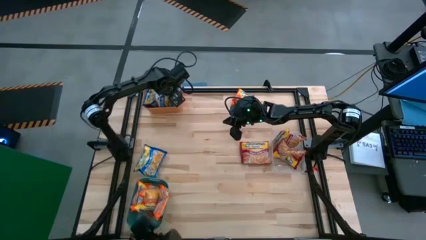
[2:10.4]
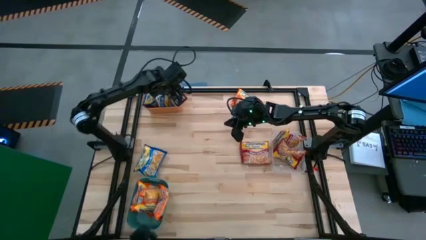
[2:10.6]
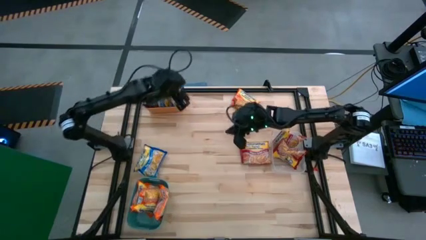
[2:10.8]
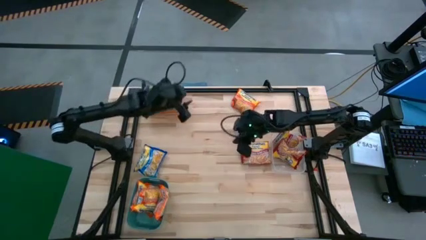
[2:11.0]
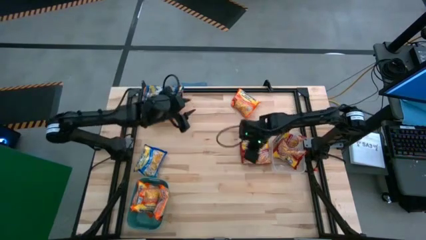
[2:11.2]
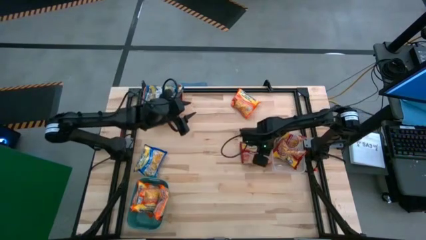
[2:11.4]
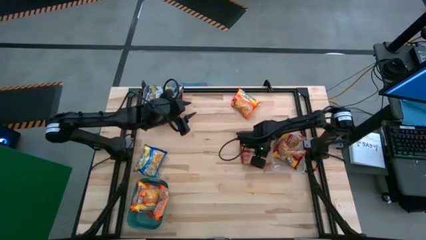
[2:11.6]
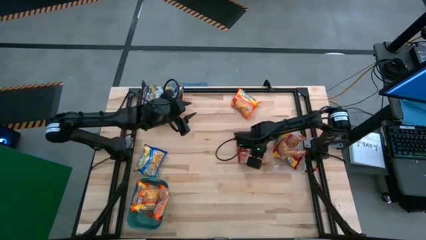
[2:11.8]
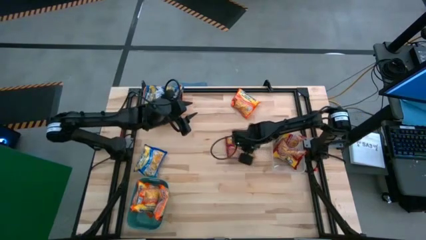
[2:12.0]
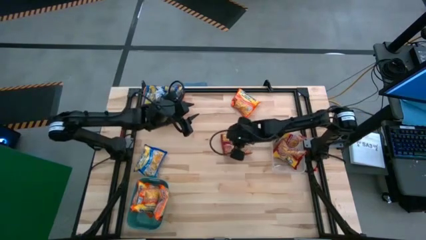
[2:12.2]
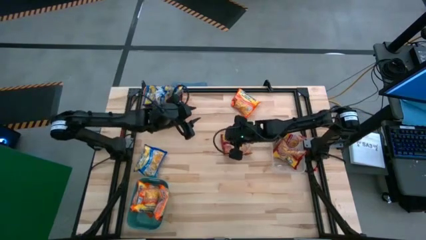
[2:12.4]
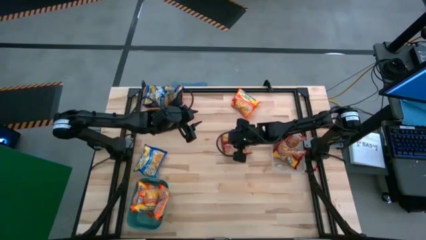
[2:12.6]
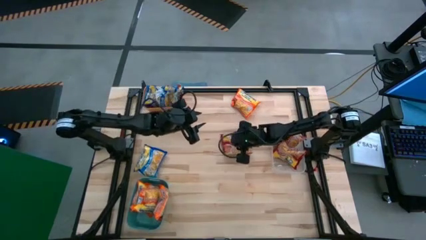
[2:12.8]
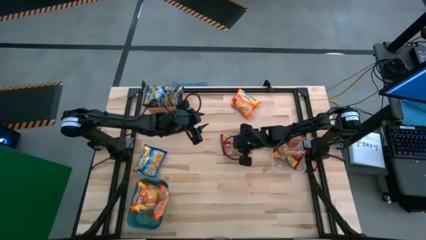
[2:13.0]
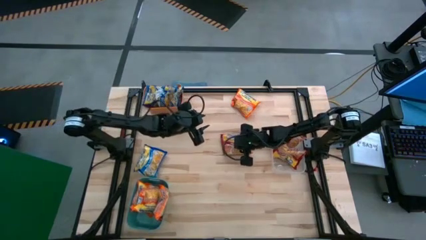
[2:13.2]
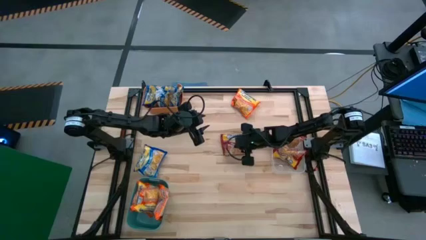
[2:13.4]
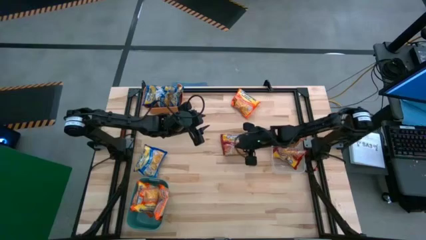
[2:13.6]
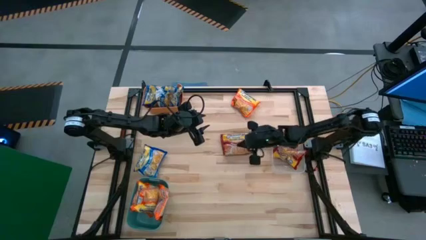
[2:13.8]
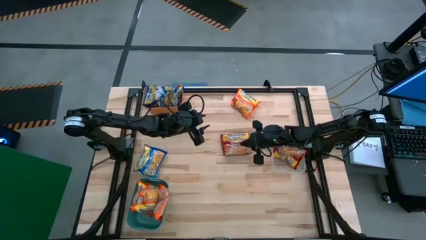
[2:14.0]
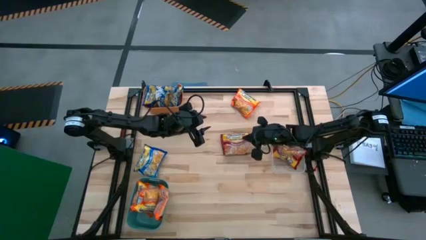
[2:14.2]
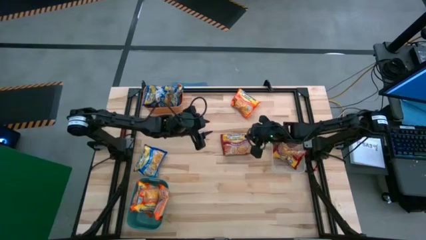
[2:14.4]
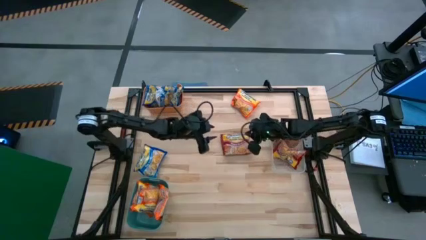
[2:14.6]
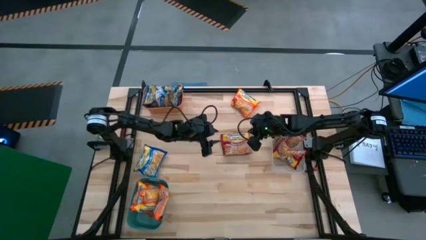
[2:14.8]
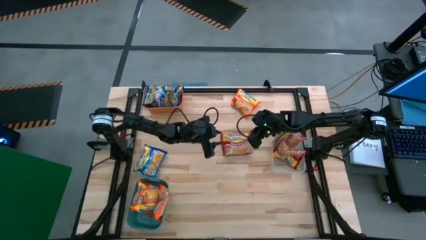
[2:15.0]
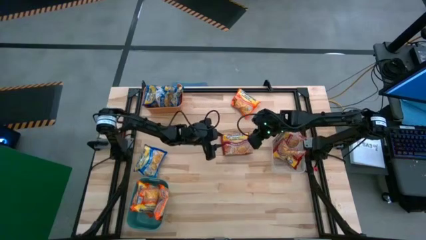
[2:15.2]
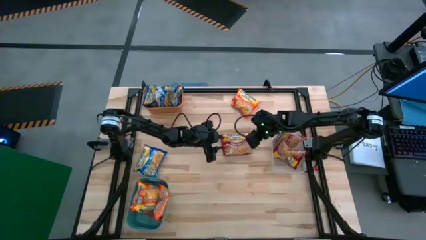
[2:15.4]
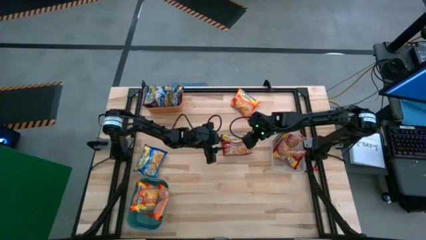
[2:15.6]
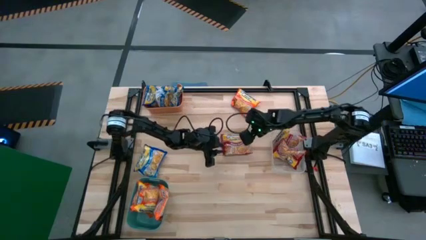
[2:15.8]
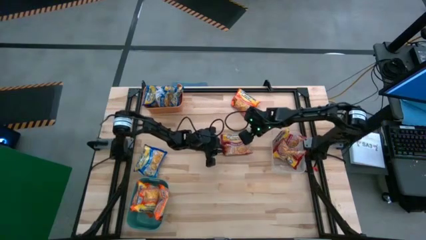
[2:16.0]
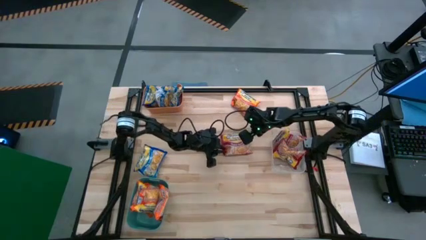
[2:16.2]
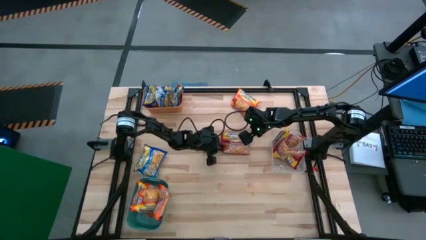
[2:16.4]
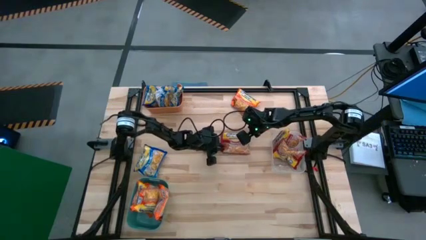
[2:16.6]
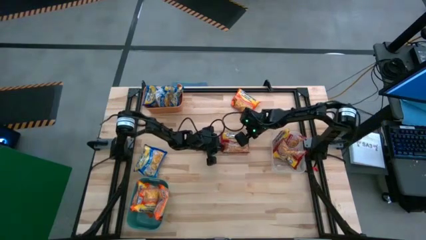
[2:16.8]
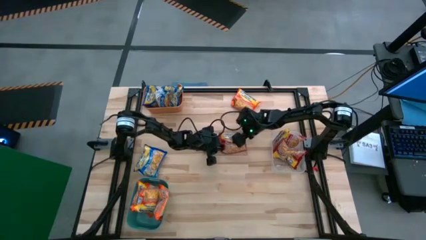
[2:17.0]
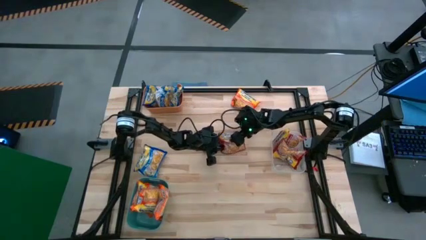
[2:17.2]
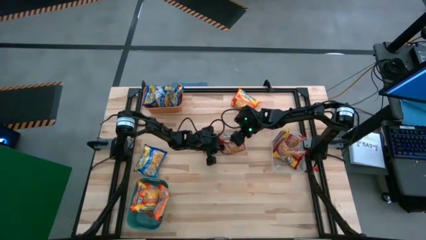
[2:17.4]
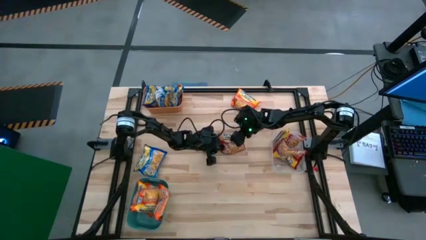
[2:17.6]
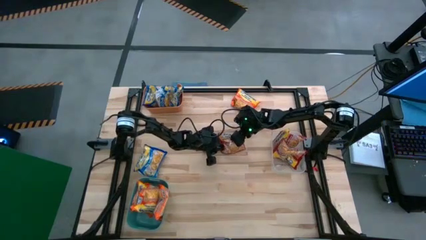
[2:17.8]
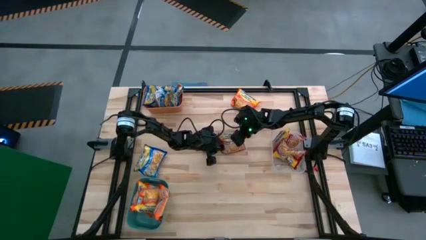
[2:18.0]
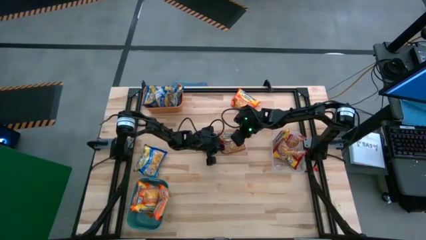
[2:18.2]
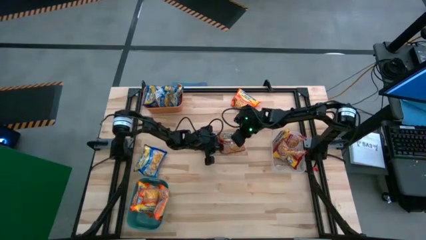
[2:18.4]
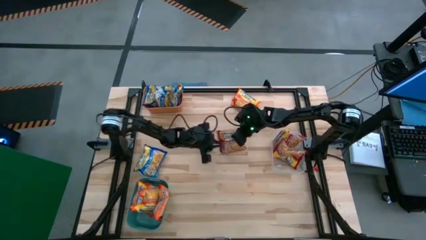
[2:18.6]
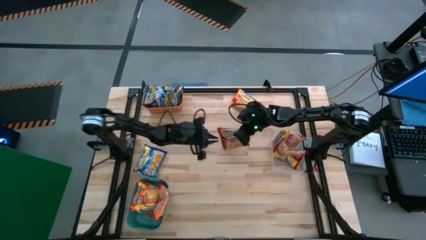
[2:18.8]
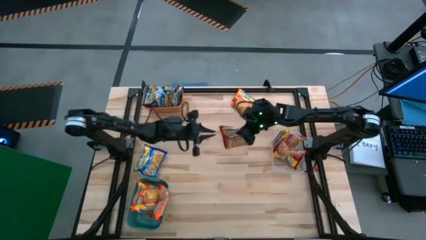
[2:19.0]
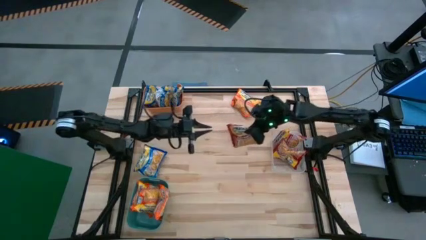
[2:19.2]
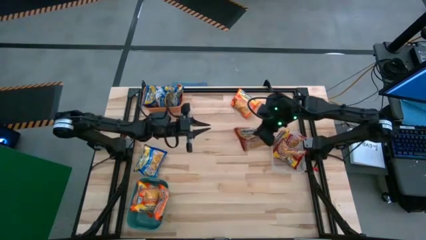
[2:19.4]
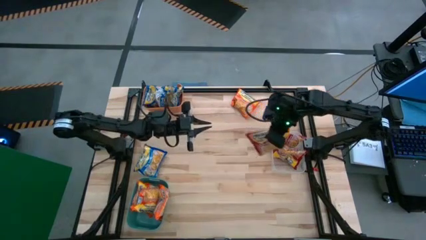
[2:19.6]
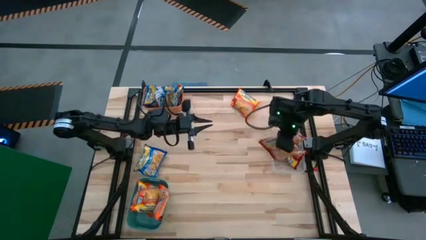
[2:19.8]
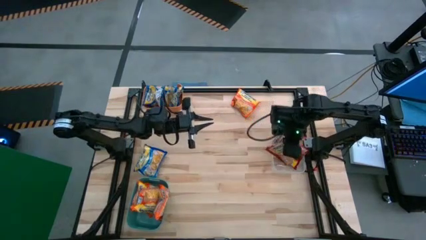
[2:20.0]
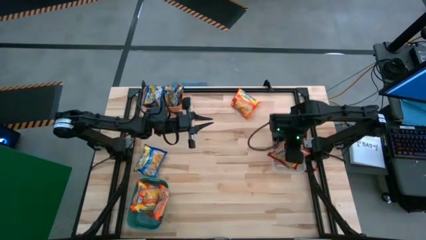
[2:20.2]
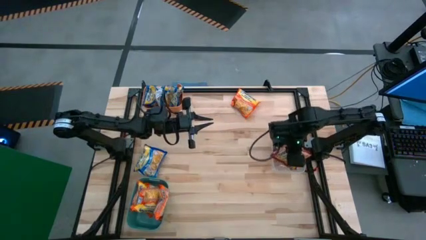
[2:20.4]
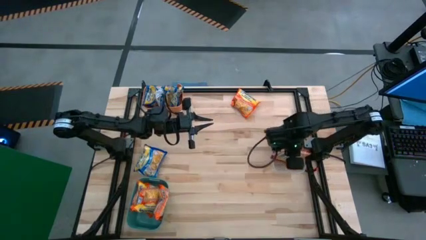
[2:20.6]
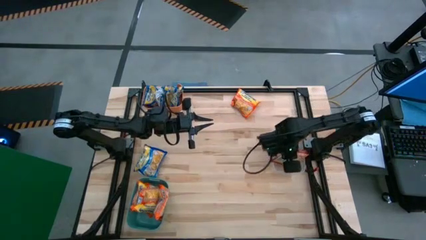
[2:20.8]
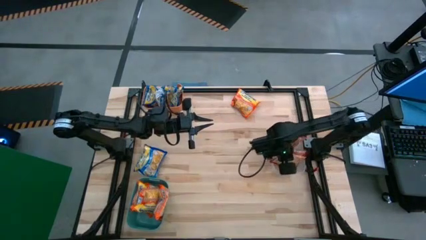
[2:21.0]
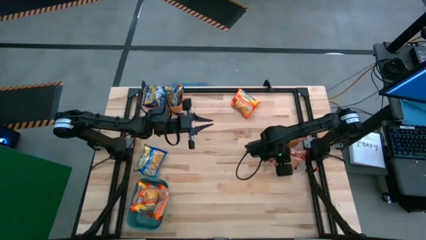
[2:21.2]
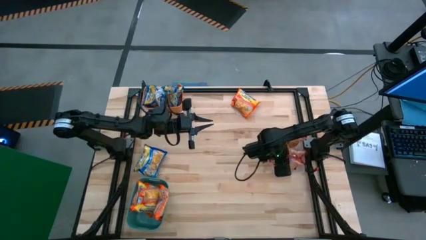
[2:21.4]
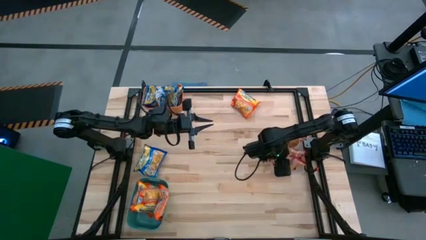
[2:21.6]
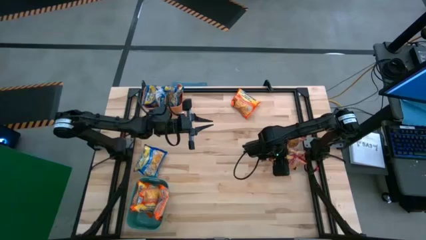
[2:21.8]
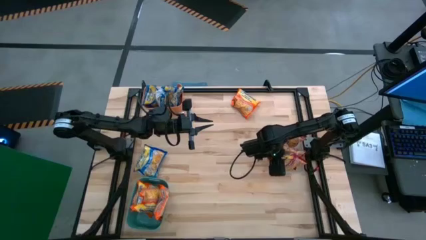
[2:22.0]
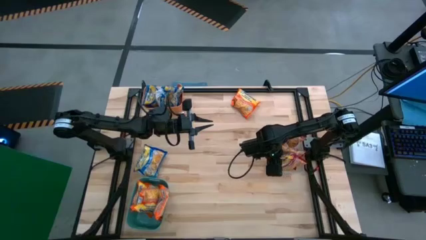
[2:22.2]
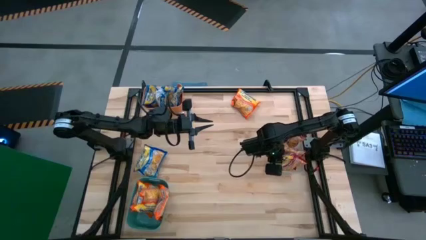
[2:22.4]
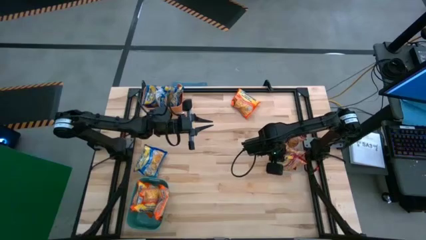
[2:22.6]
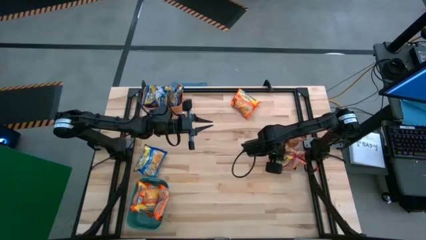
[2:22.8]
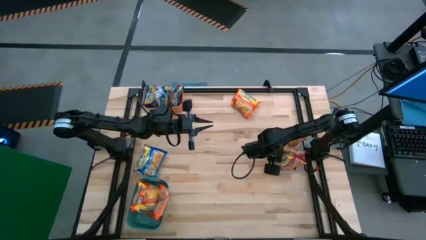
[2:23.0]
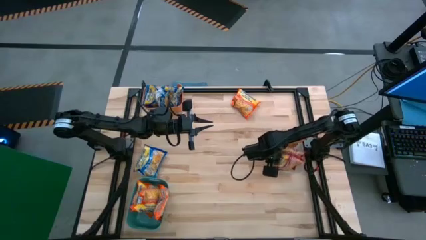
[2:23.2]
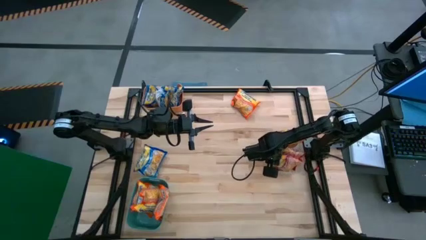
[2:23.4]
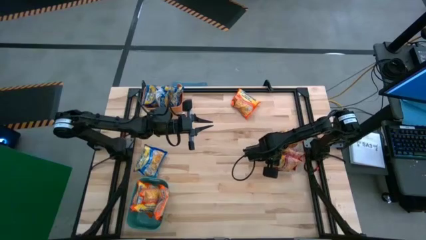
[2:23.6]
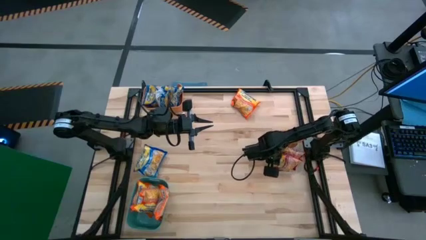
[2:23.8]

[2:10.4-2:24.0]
Task: Sort Maruchan noodles
Put the red noodle pack into the transparent bin

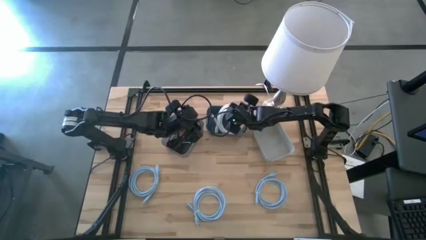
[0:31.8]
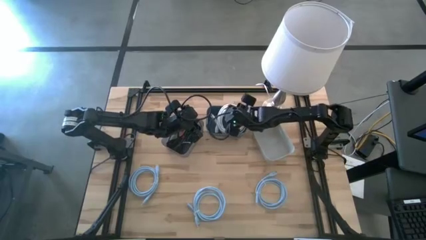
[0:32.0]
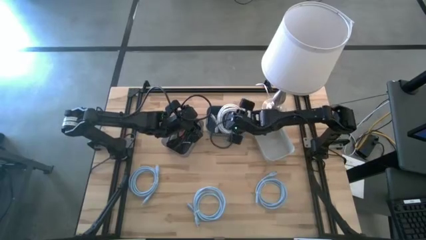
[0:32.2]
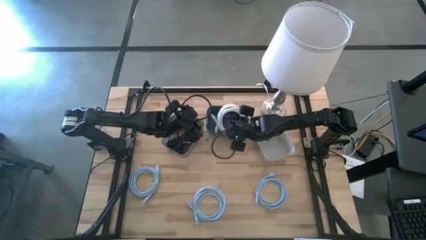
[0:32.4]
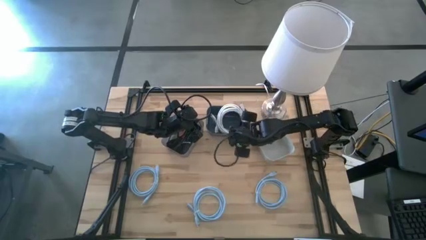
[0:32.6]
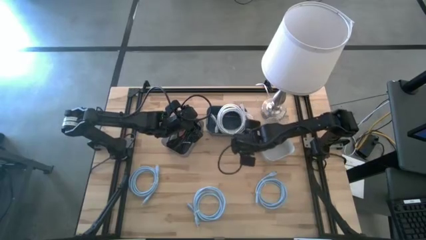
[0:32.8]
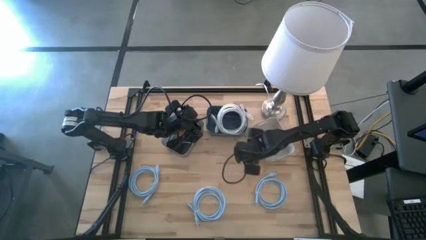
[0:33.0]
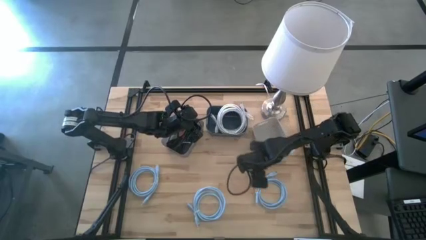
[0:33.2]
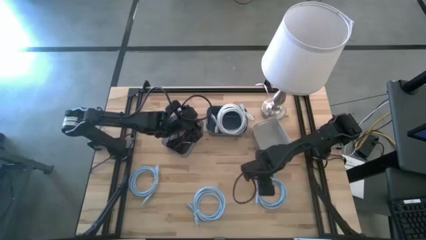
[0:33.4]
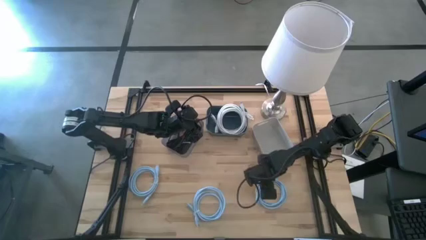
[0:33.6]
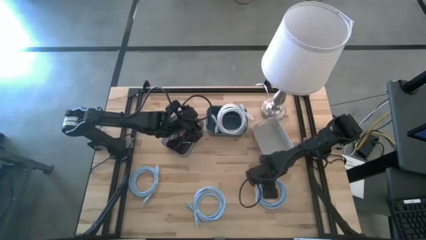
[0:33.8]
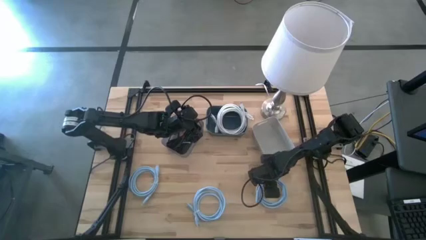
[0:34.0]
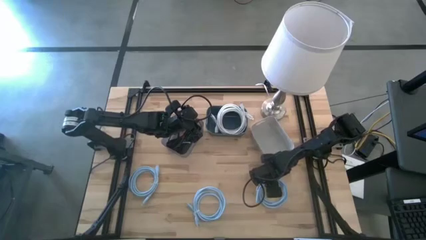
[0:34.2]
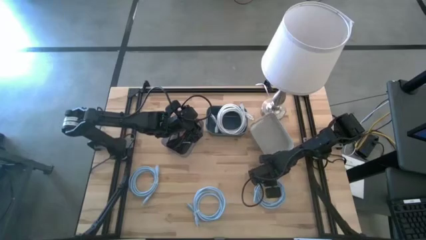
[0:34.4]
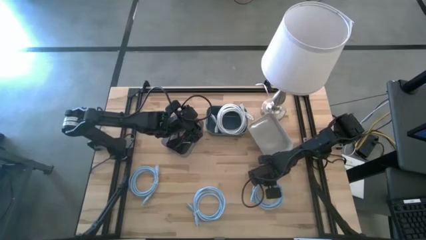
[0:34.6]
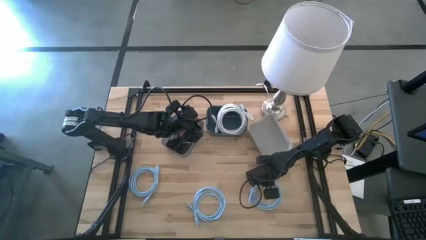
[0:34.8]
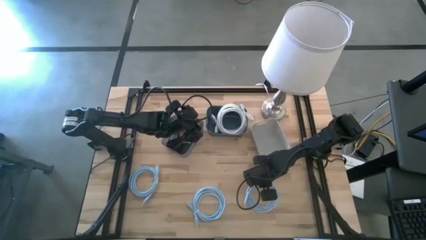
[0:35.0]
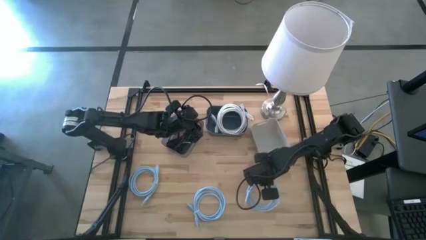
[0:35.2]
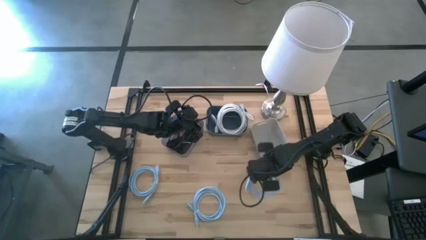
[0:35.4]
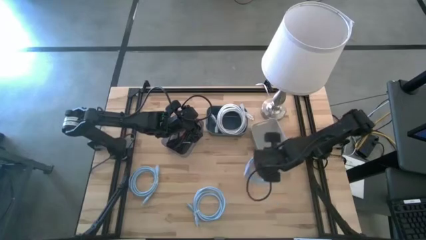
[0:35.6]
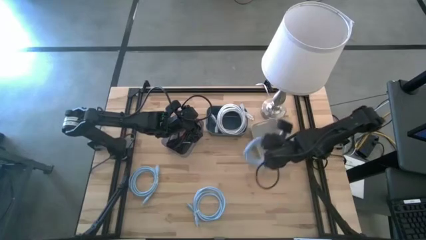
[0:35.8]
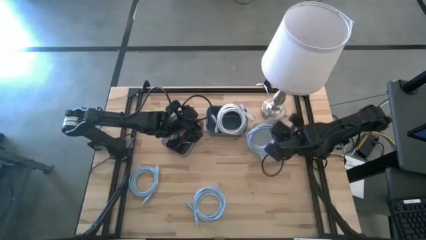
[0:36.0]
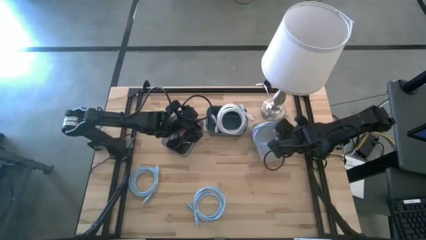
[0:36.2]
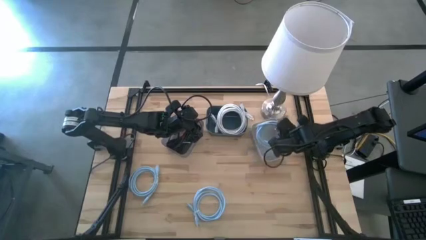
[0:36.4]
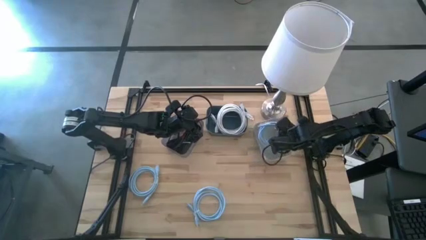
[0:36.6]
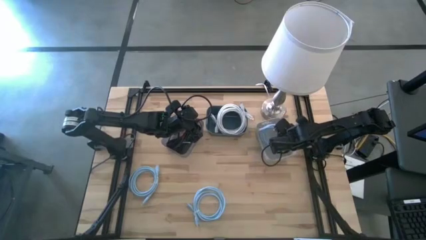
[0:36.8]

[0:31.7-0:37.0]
Task: Sort HDMI cables
Put the right blue HDMI cable into the white bin
